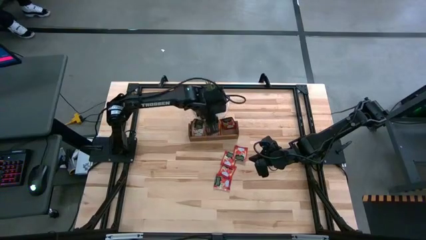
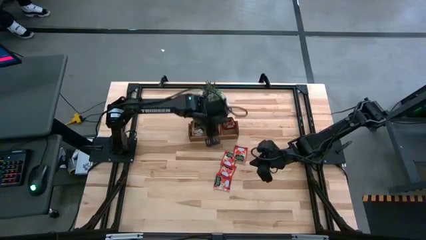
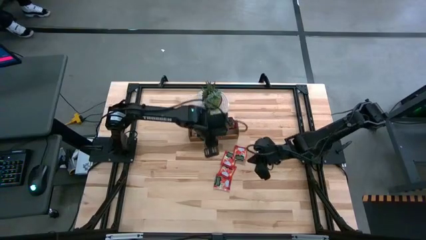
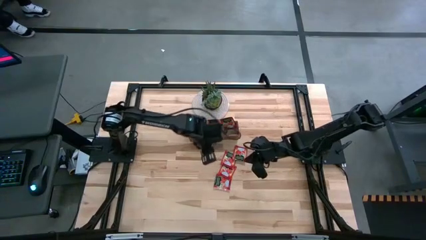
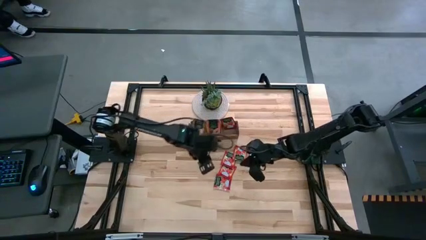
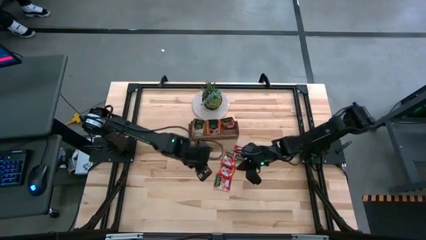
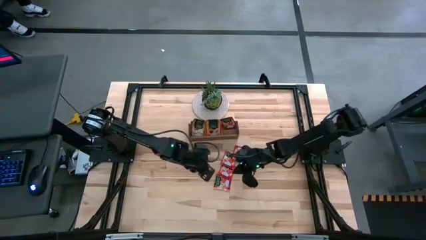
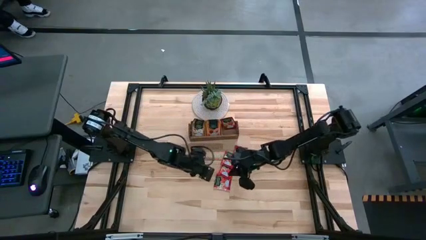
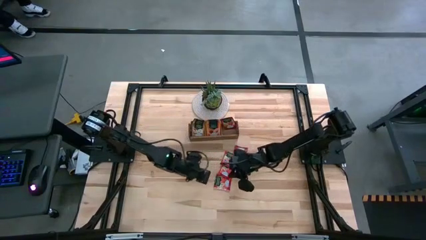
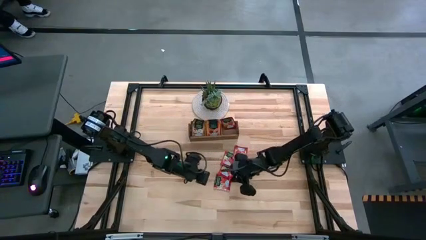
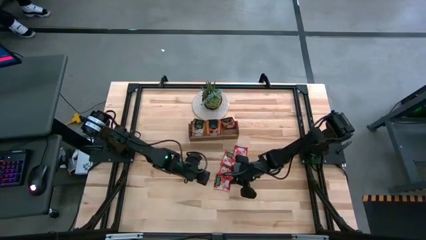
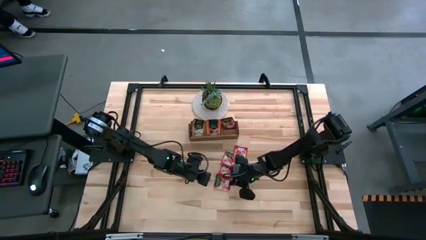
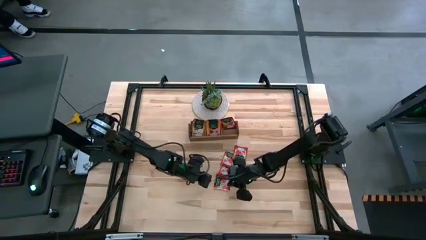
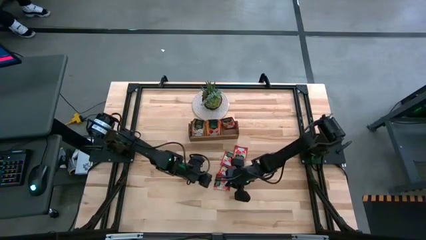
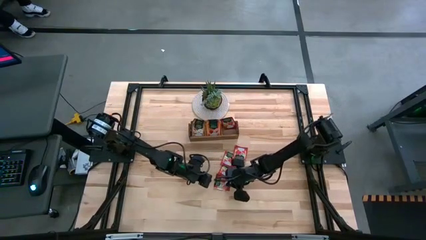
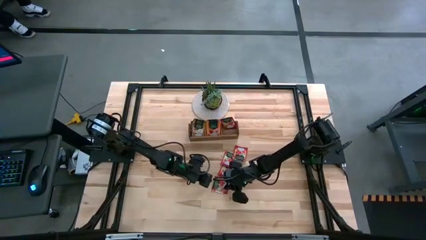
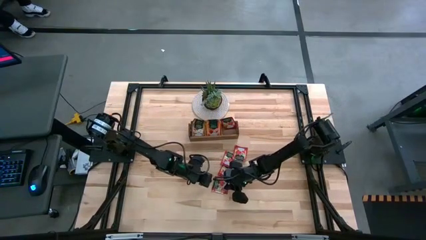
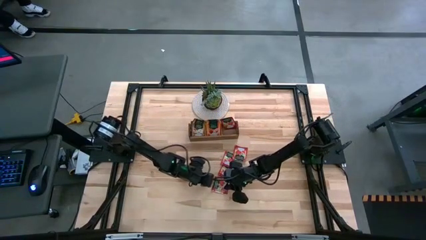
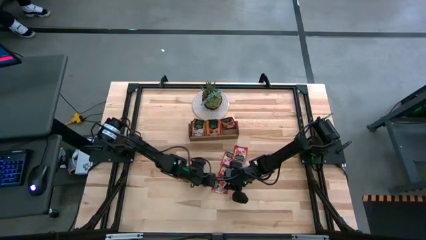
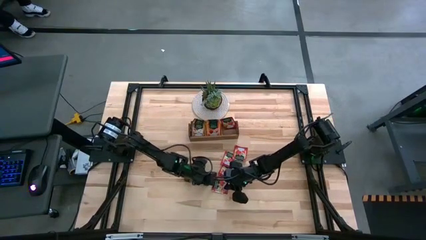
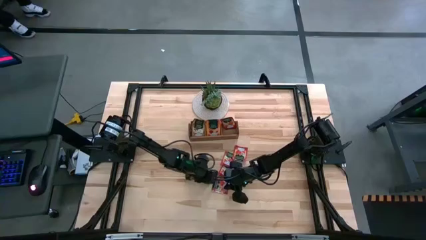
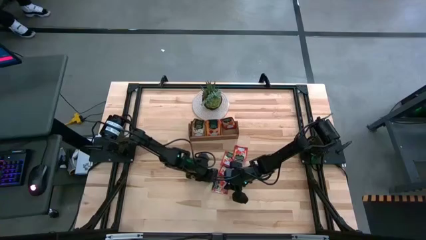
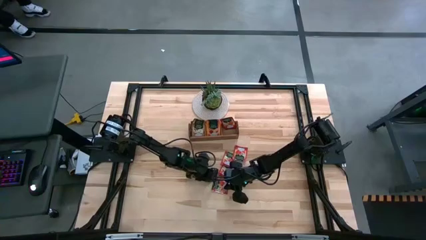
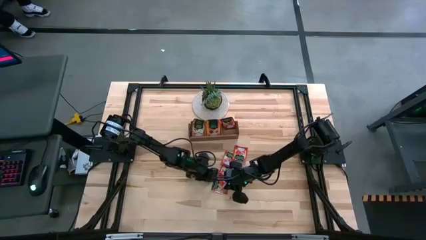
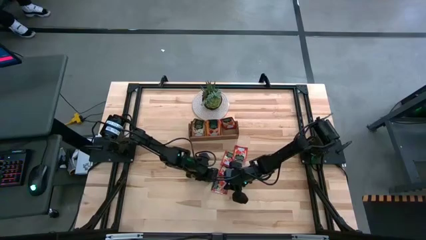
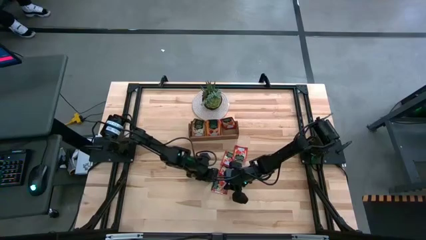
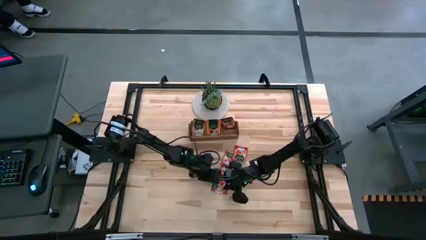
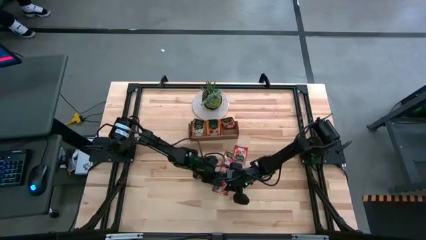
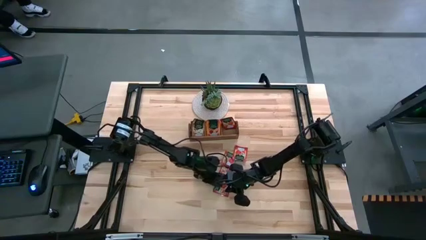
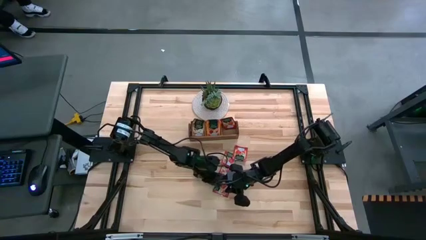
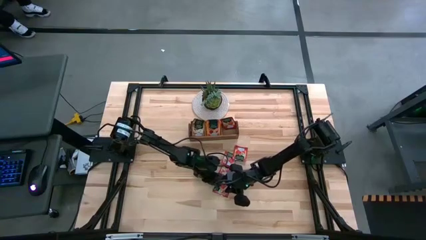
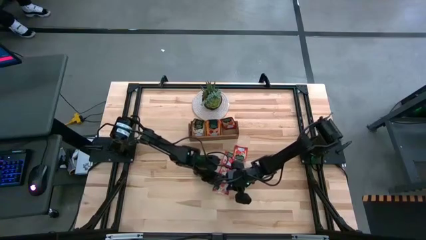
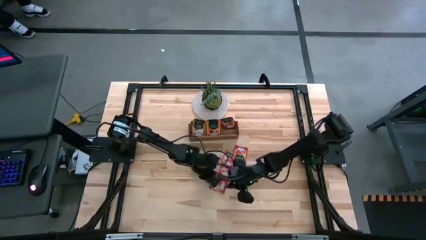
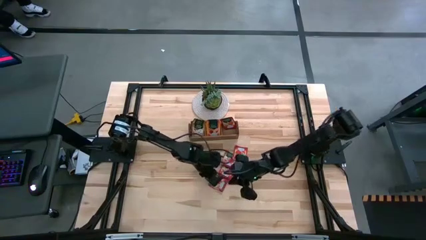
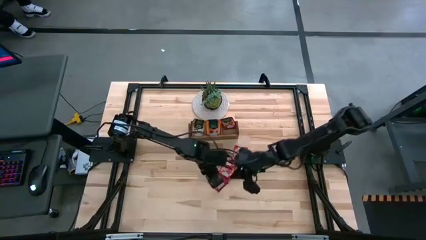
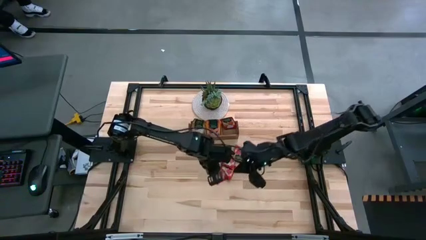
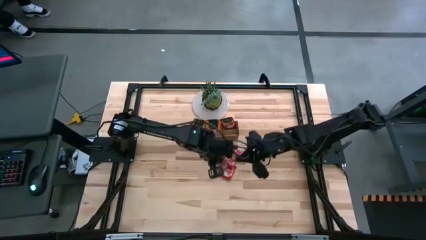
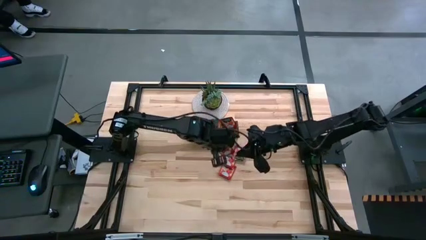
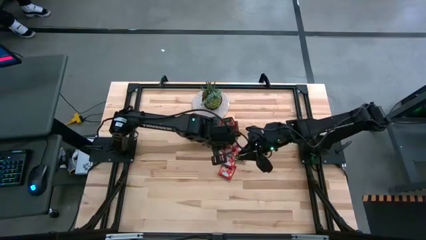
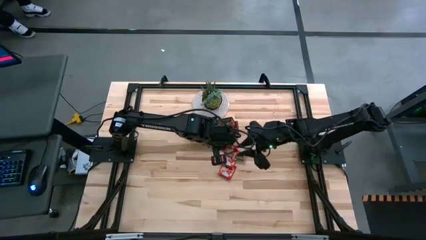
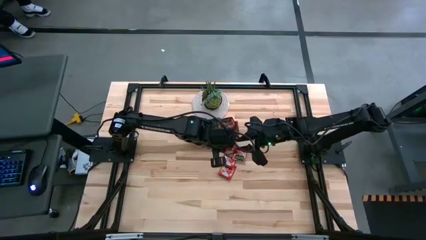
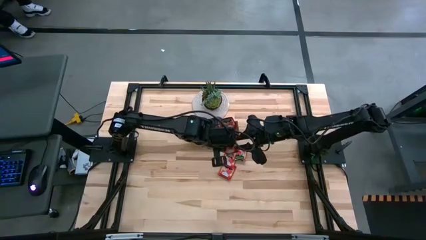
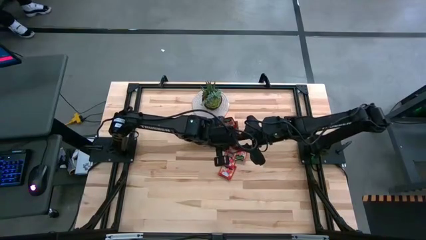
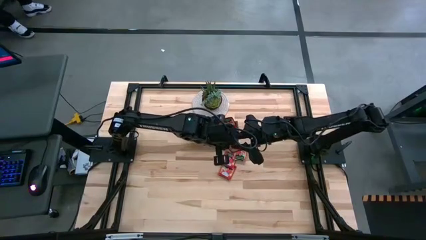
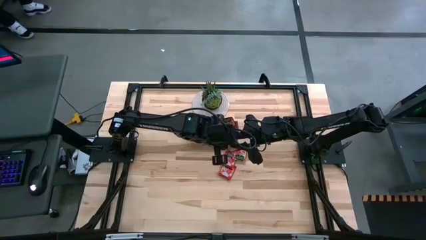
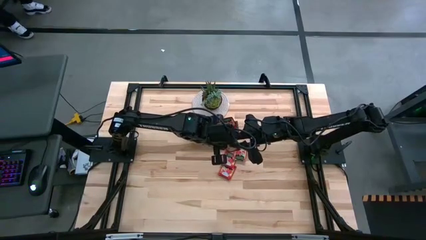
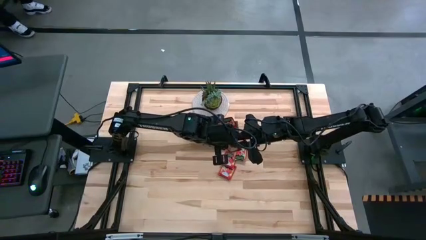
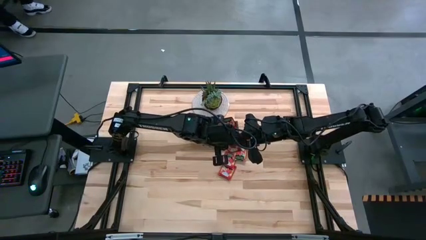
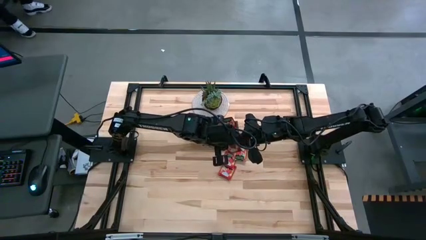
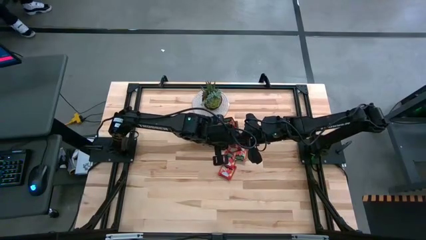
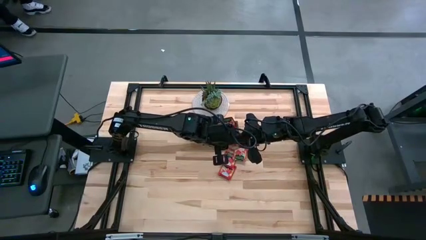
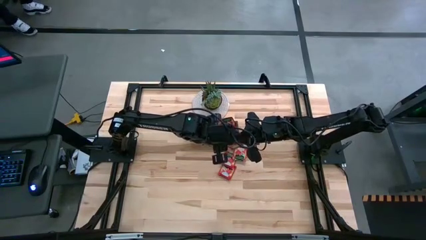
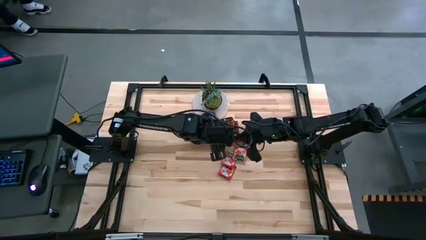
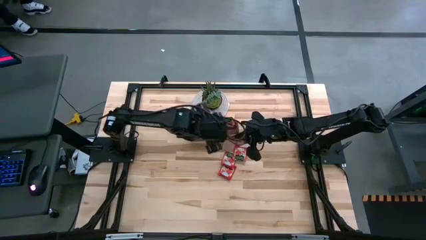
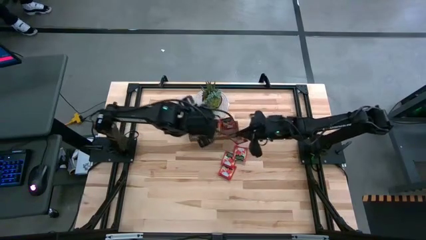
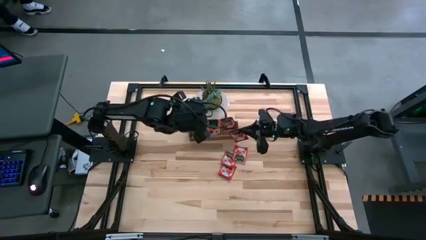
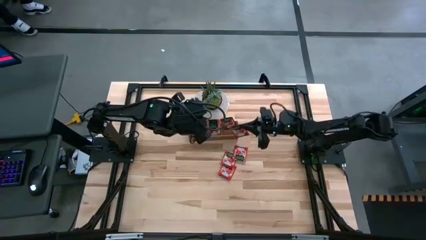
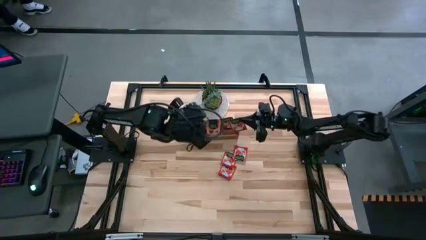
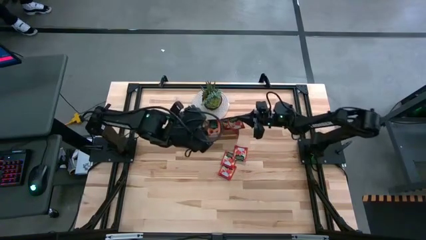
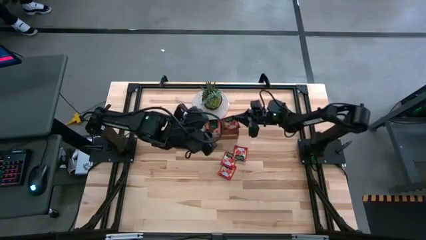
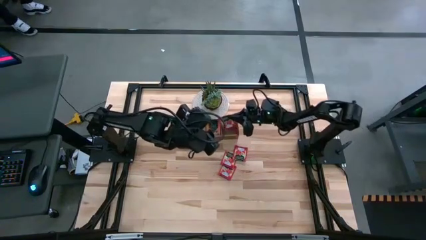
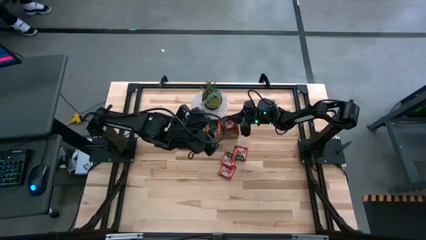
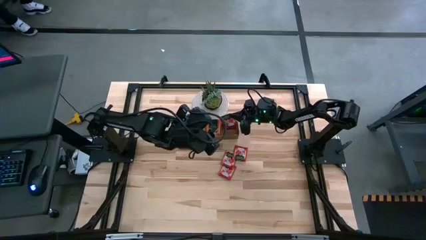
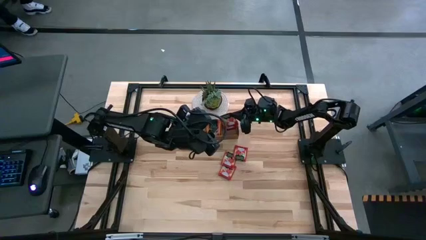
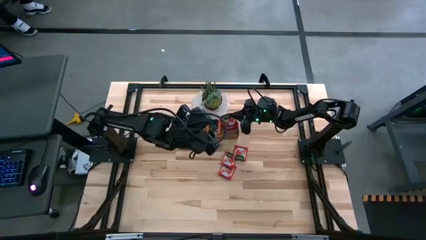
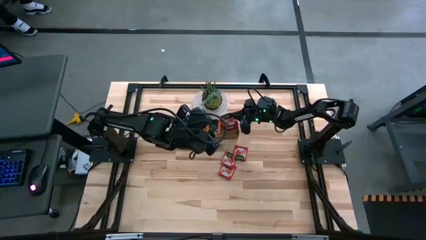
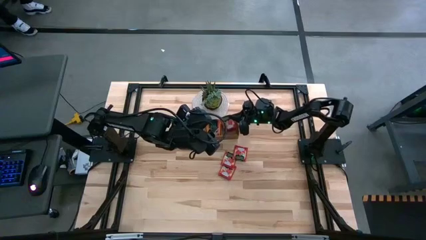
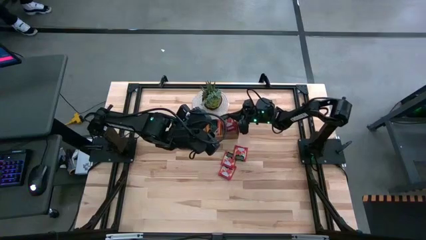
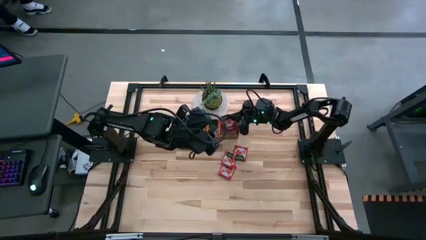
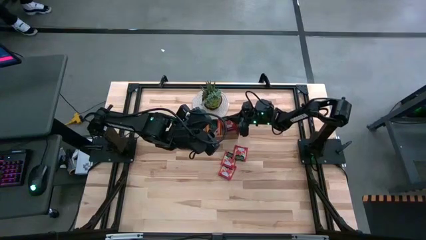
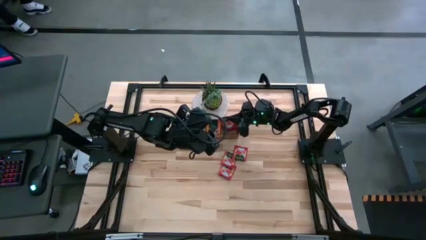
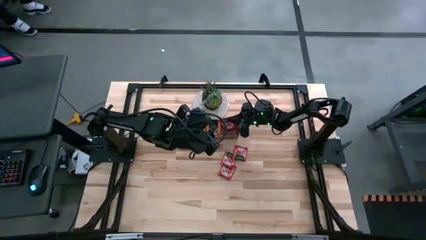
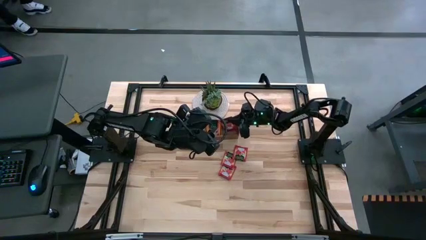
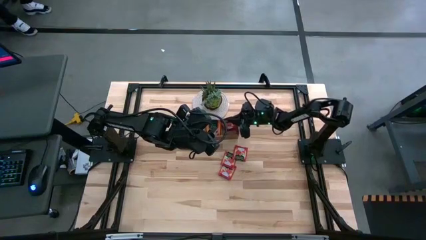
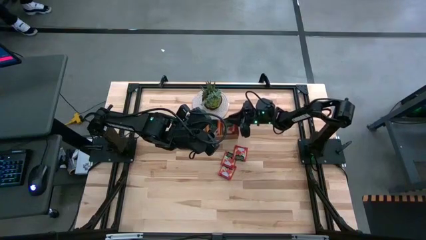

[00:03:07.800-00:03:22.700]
Task: Pick & Place Tea
Put the red tea bag into the right section of the wooden organizer

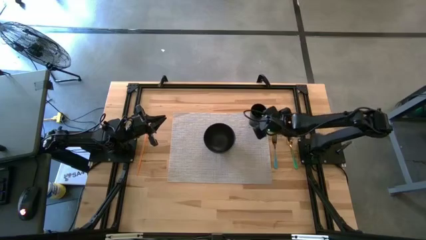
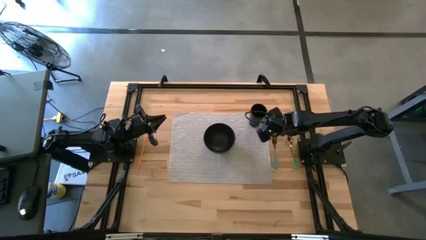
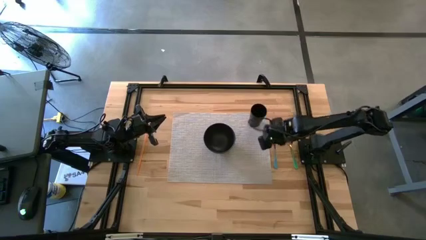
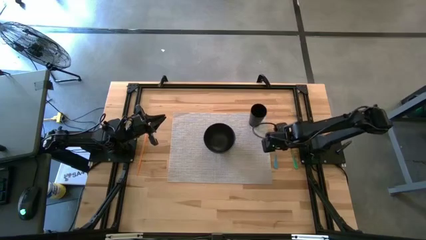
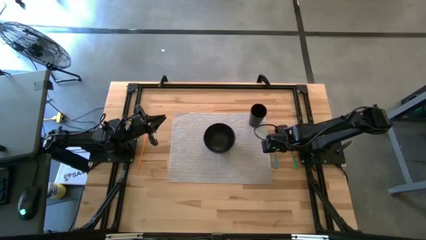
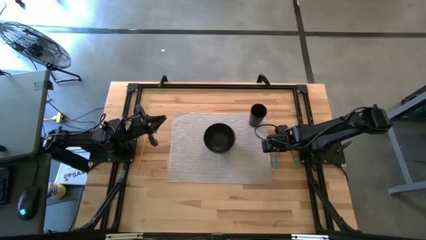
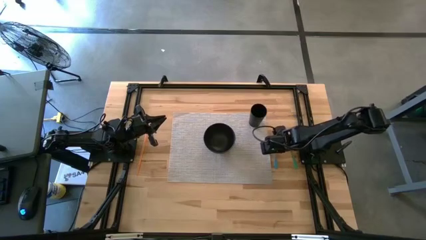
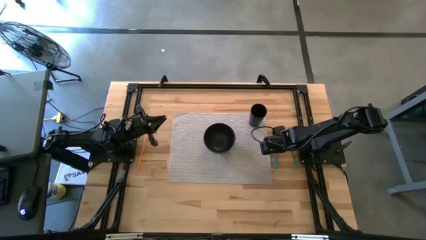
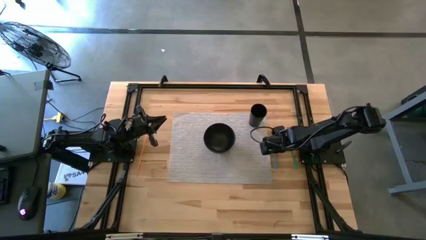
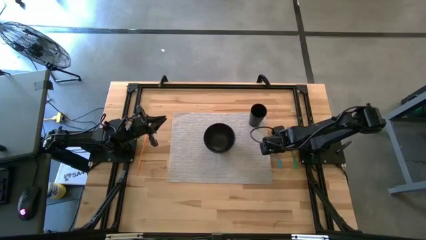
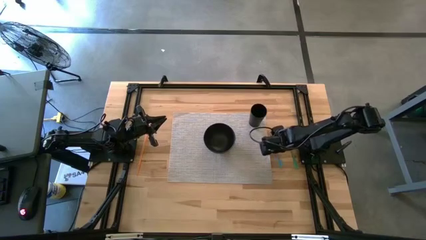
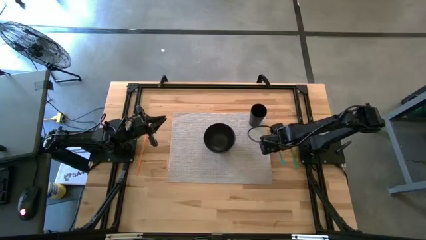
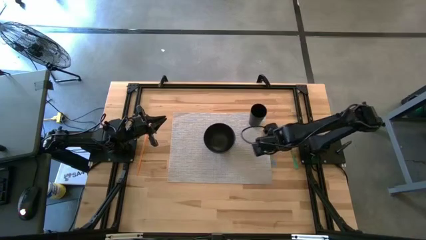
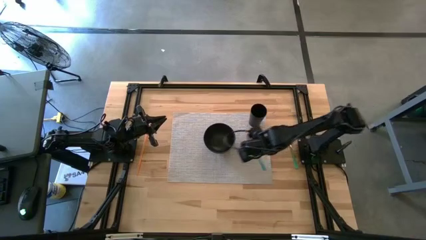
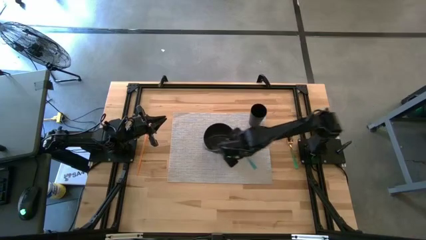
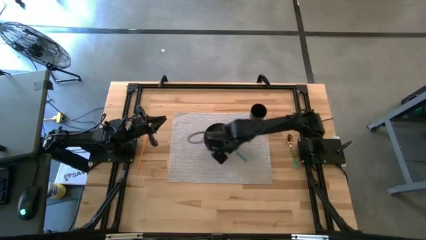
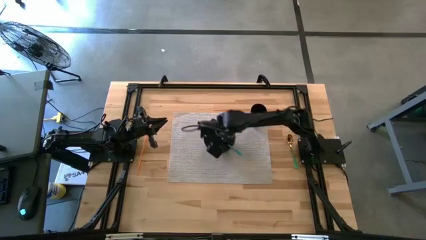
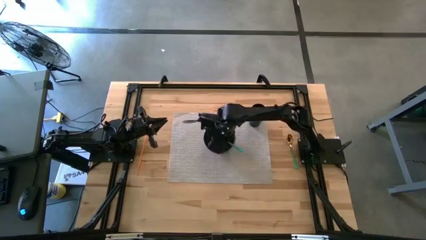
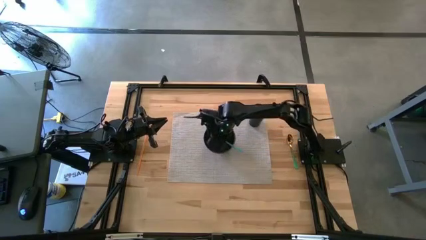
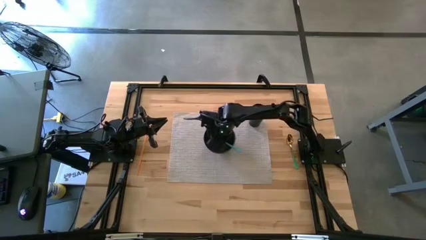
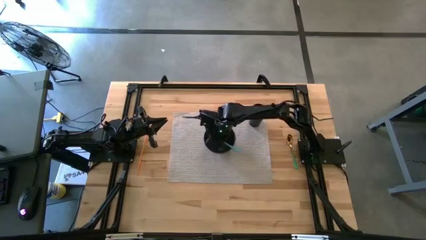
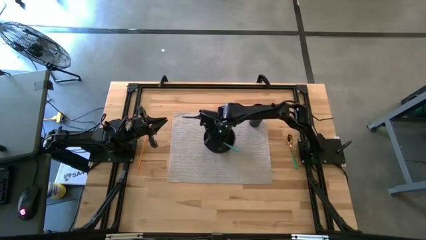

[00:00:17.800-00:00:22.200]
Task: Pick & Place Utensil
Put the blue fork into the black bowl on the gray mat
